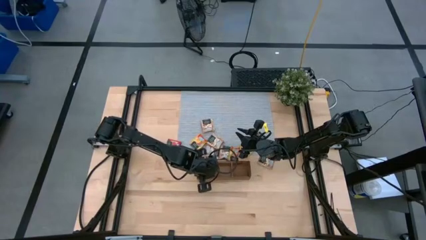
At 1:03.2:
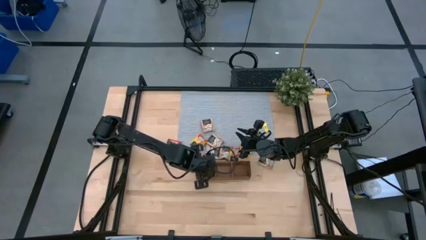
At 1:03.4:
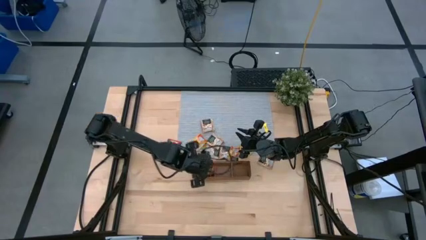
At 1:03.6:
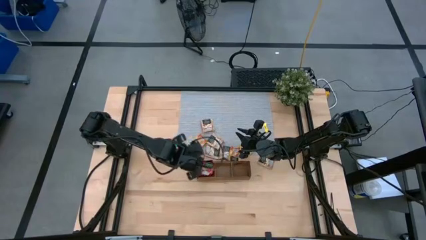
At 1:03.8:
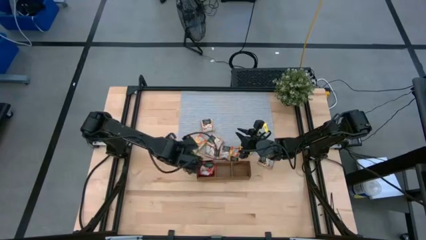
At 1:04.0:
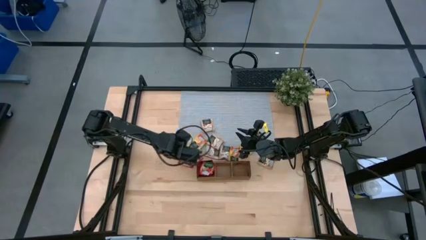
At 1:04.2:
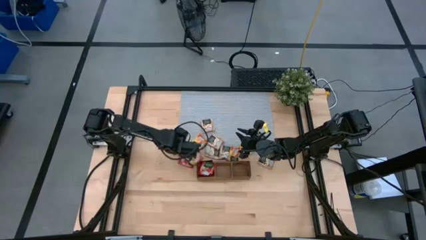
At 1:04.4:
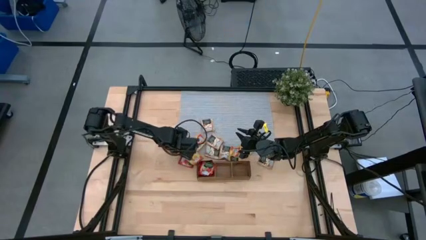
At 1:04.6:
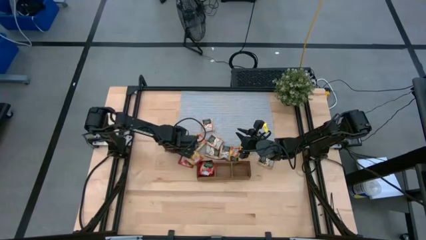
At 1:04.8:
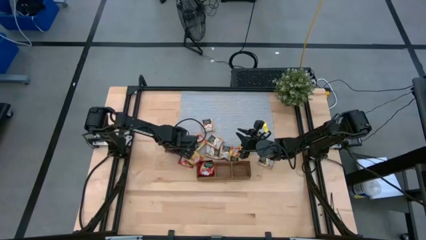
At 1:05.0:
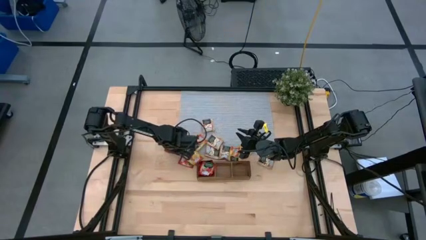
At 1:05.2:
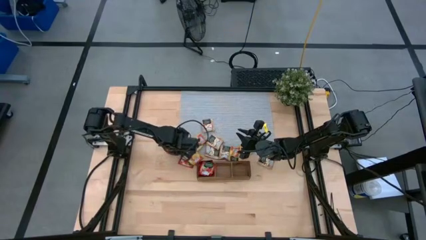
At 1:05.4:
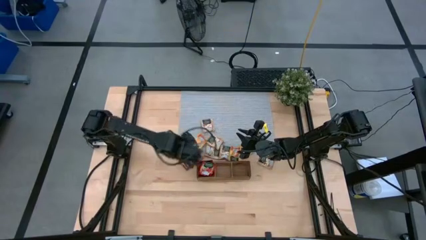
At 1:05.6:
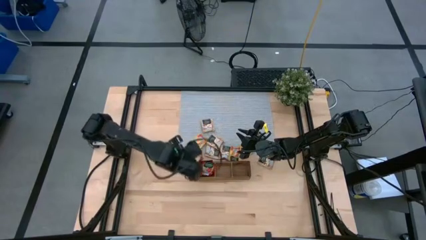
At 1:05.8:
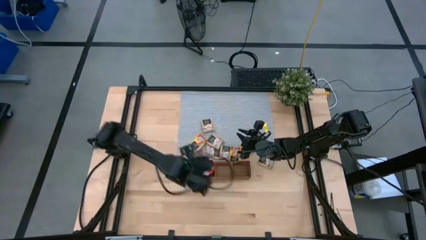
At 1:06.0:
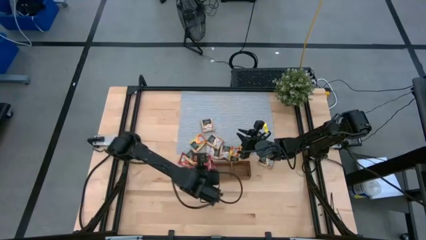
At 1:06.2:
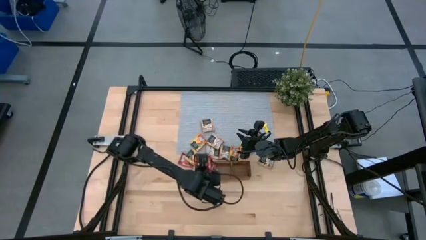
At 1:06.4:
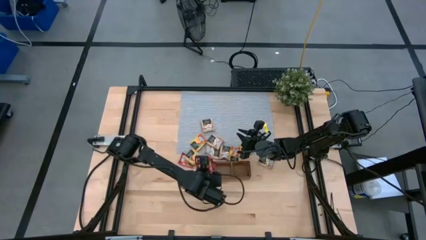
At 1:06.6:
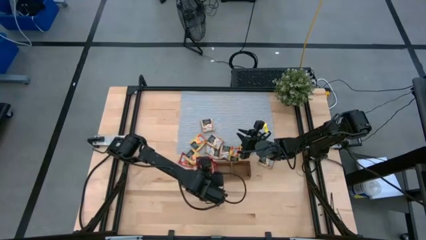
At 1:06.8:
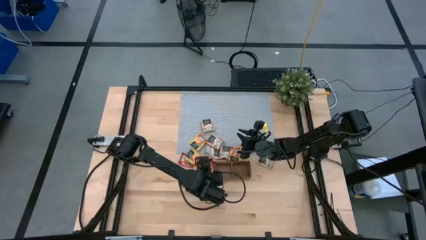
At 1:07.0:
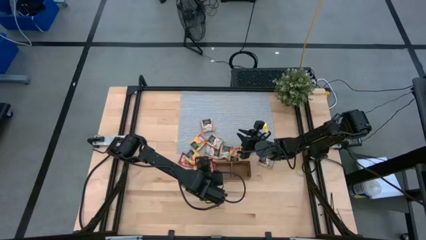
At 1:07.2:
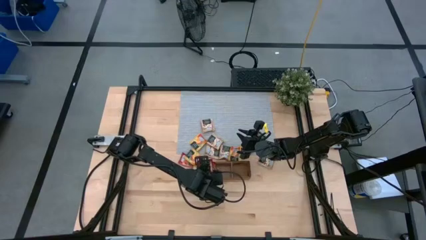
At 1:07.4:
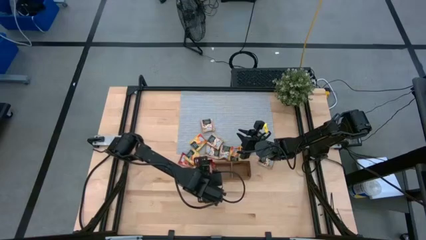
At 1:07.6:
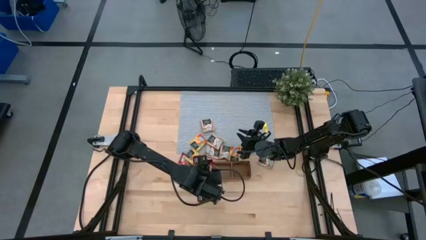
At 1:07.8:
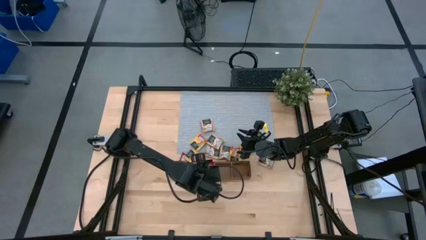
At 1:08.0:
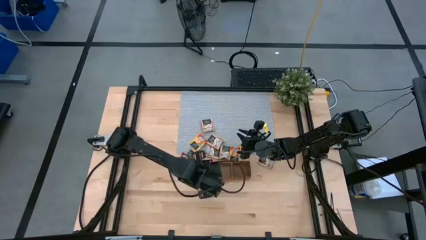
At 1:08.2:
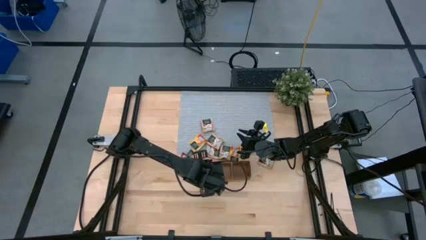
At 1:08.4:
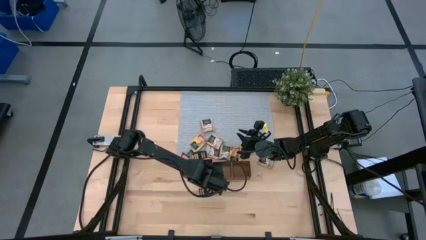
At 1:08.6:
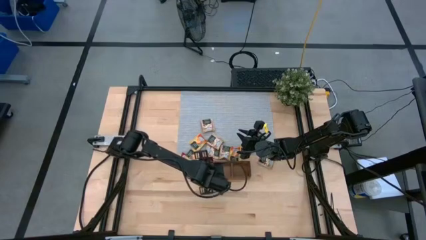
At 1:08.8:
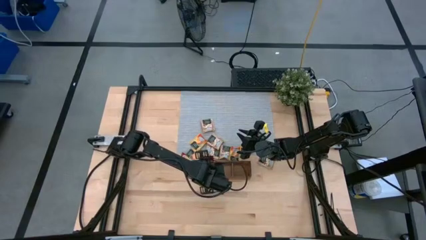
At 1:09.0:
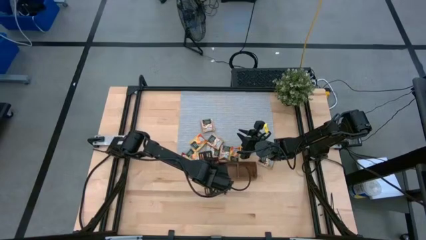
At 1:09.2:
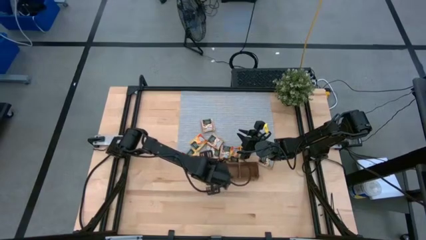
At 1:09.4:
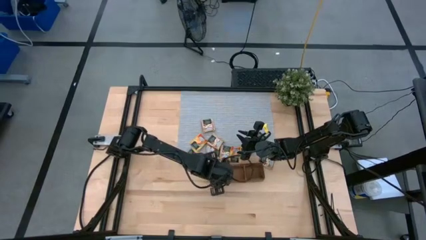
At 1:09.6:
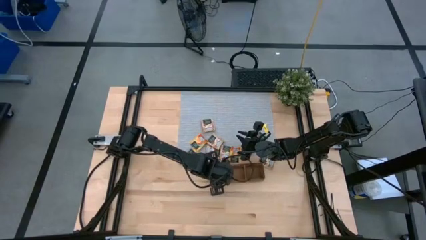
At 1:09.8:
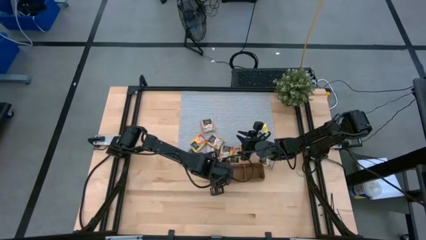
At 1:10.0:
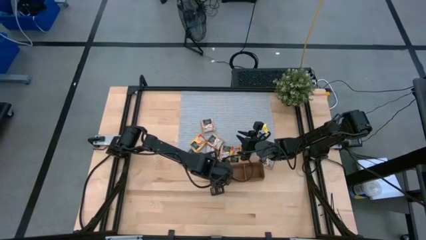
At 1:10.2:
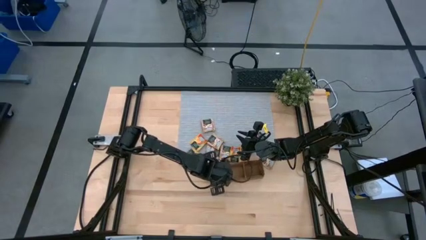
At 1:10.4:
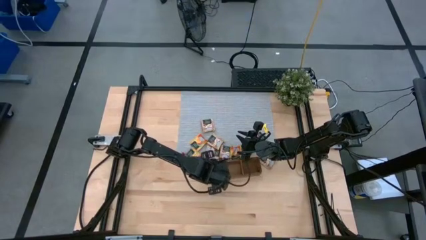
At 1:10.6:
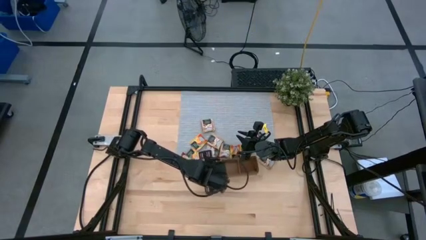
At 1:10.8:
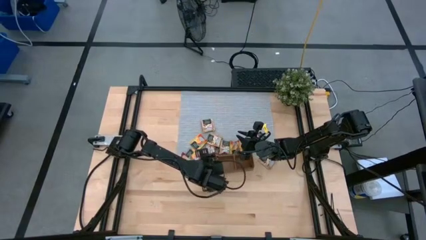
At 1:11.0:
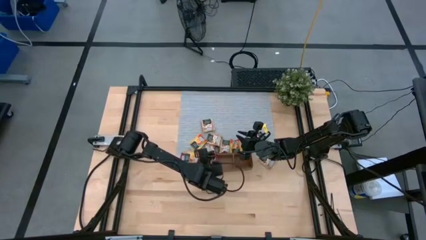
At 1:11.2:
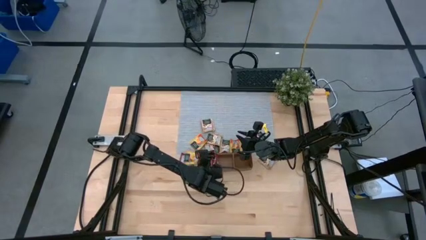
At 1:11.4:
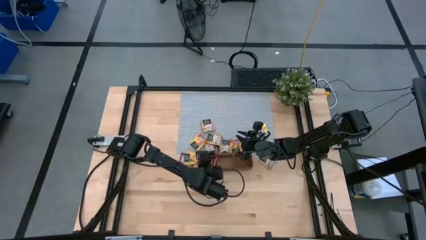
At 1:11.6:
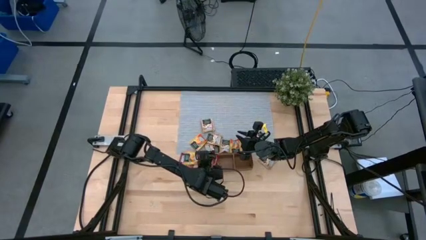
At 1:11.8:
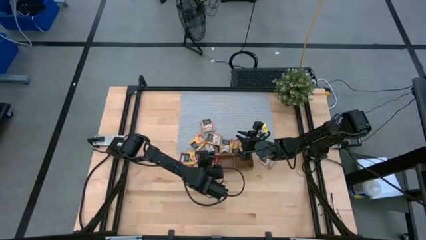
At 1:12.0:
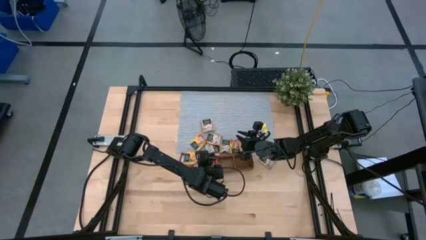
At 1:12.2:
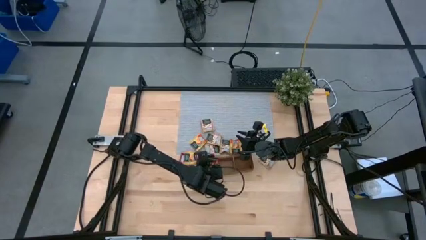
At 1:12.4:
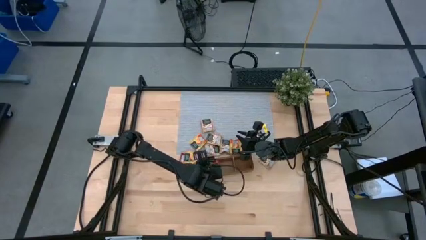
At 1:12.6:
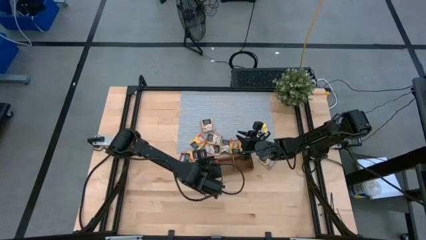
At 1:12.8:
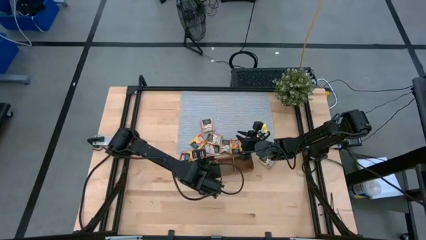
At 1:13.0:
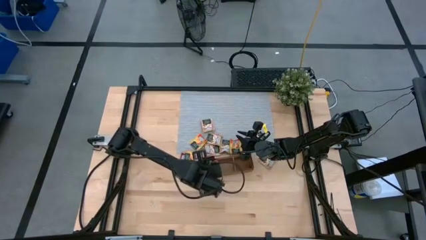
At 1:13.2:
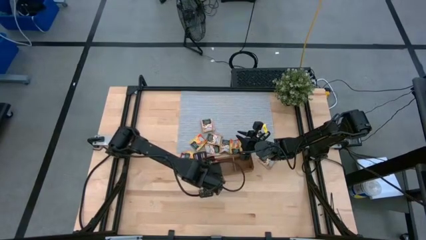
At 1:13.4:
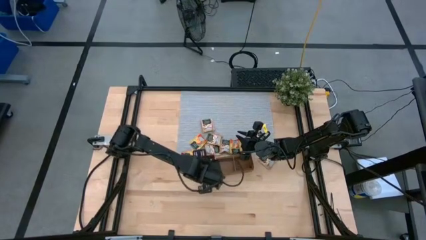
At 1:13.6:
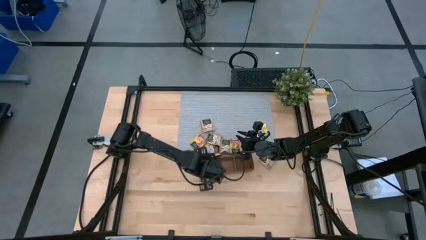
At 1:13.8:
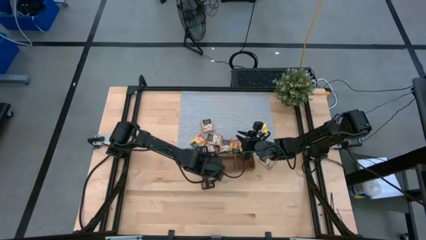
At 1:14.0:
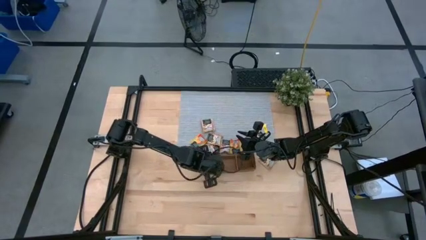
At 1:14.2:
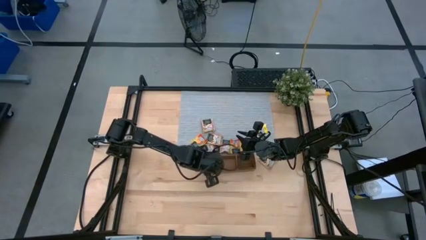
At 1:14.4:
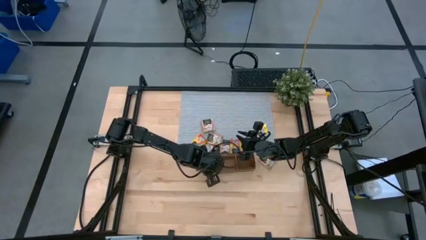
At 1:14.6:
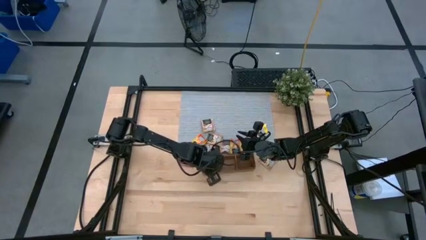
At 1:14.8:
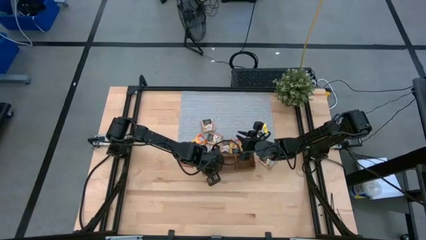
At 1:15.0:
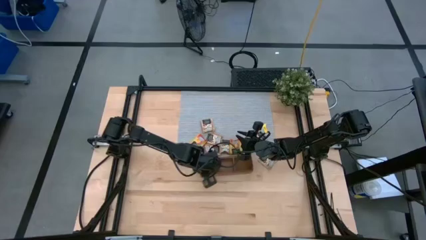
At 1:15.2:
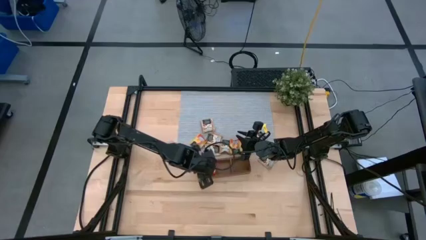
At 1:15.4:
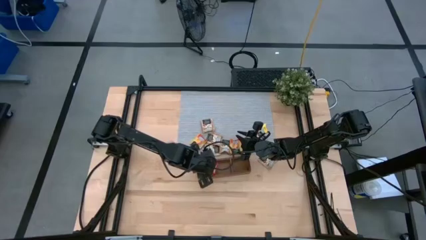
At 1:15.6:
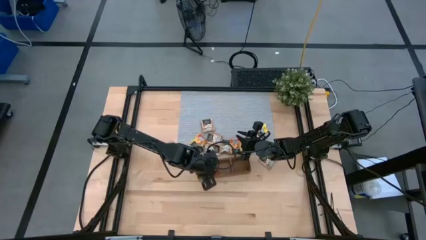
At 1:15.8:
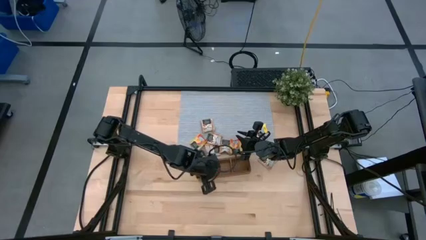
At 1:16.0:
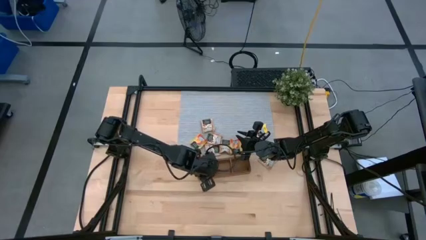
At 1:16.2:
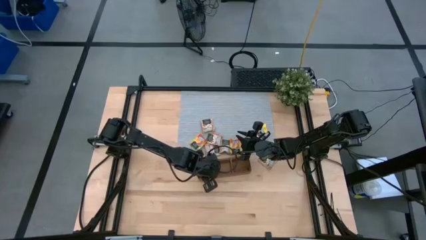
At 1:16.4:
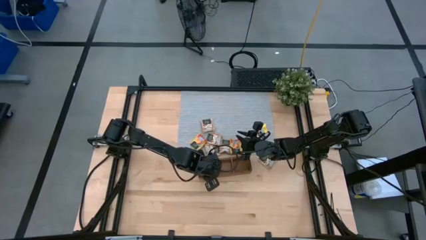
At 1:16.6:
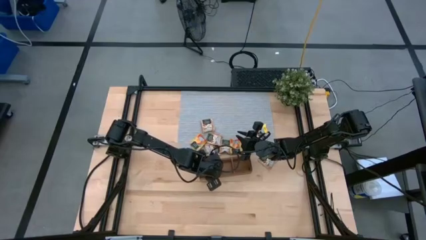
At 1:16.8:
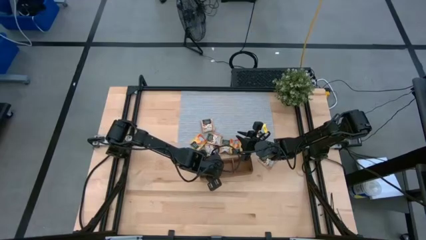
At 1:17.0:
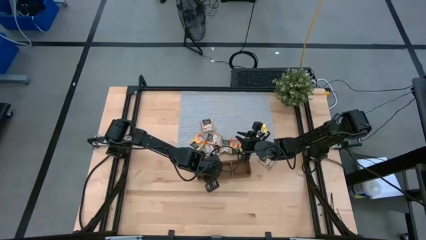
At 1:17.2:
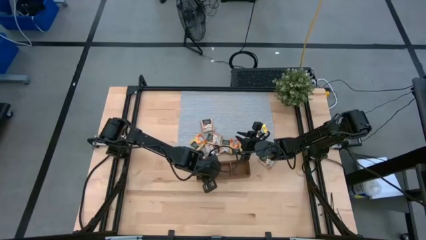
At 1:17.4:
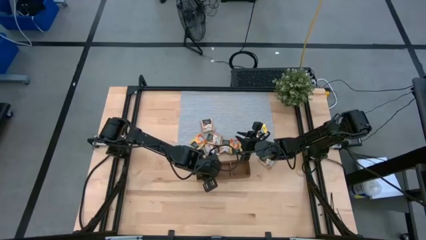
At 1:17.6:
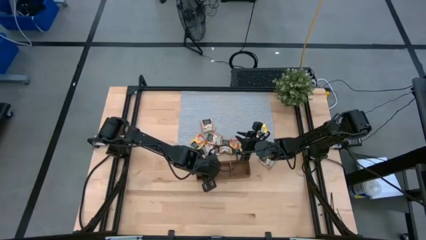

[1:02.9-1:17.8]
Task: Pick & Place Tea
Put the red tea bag into the left section of the wooden organizer
